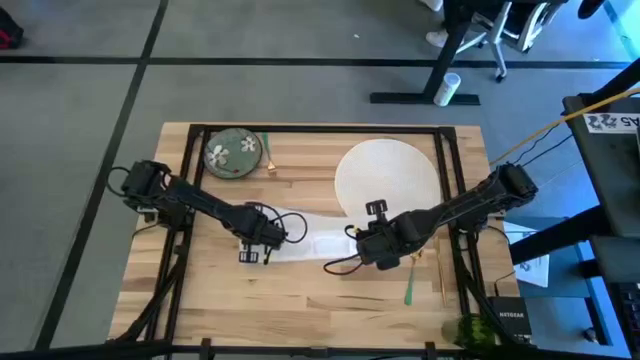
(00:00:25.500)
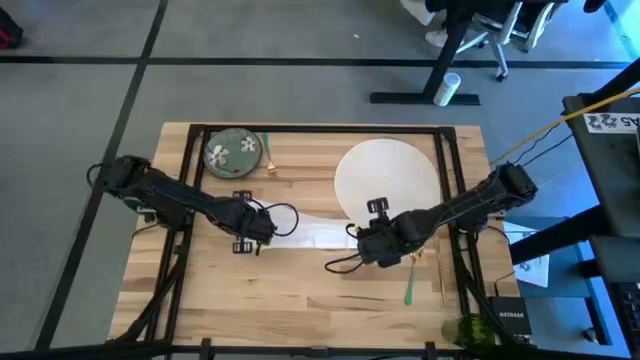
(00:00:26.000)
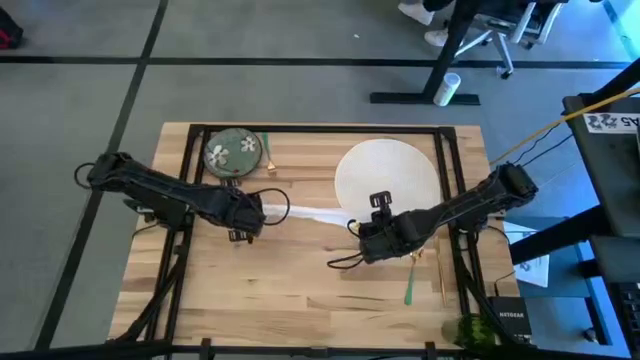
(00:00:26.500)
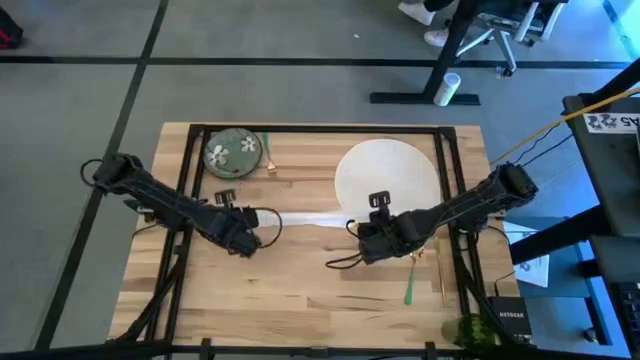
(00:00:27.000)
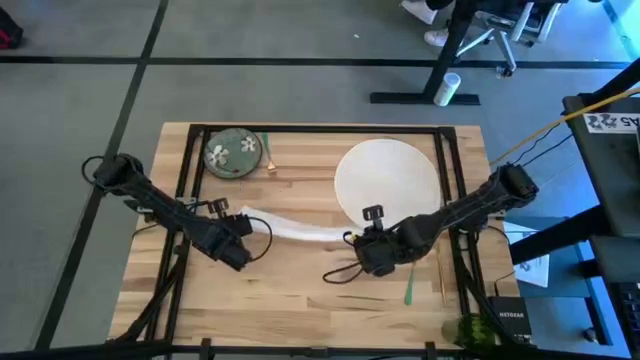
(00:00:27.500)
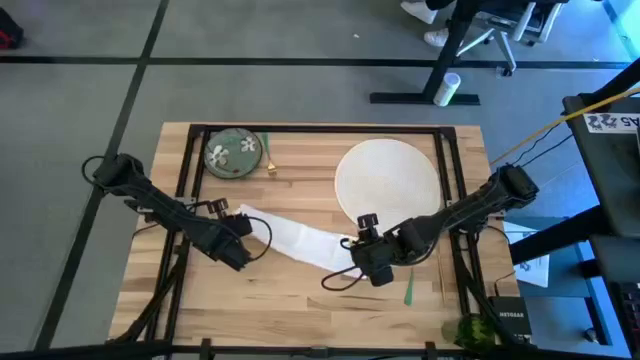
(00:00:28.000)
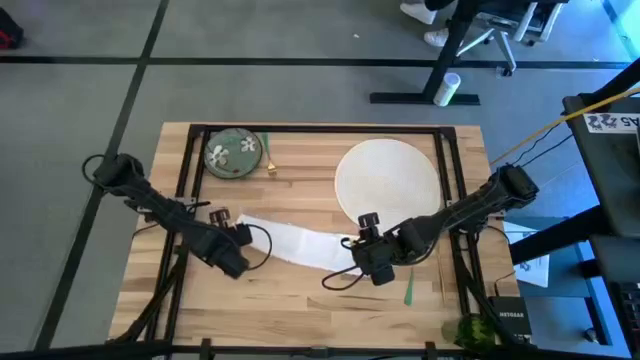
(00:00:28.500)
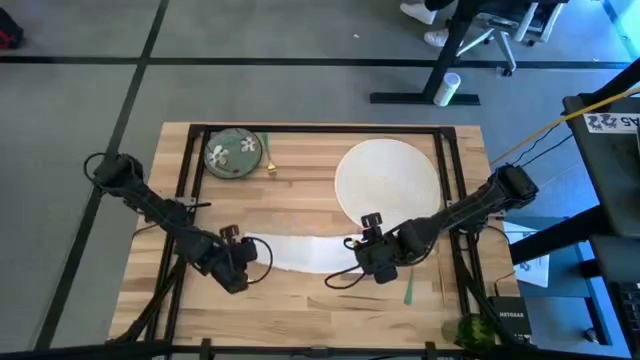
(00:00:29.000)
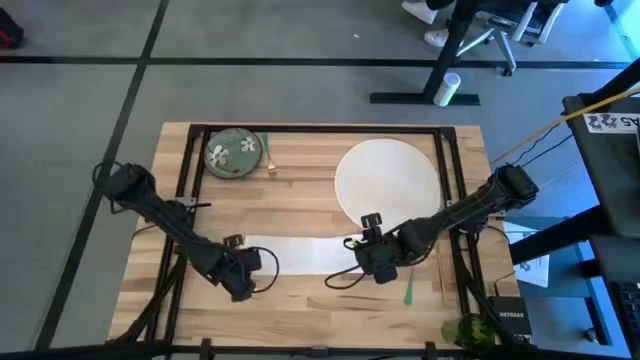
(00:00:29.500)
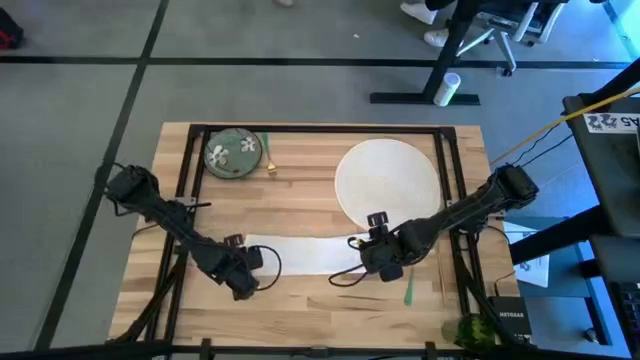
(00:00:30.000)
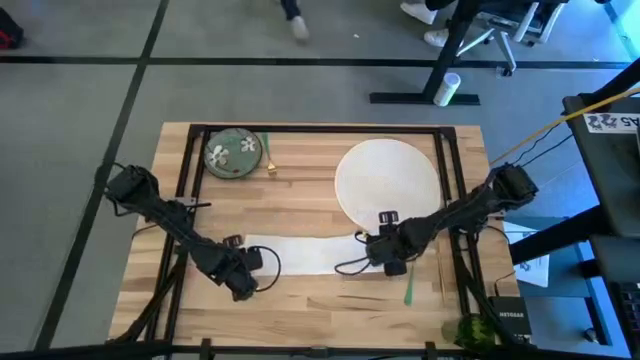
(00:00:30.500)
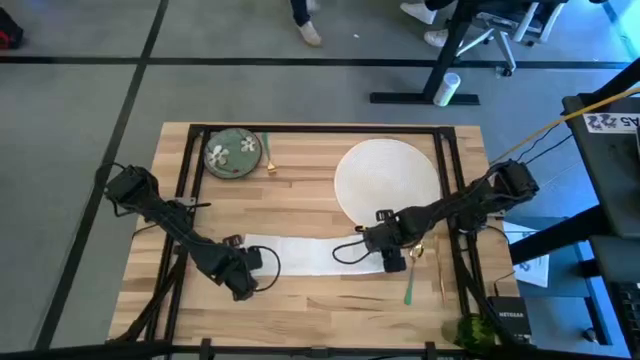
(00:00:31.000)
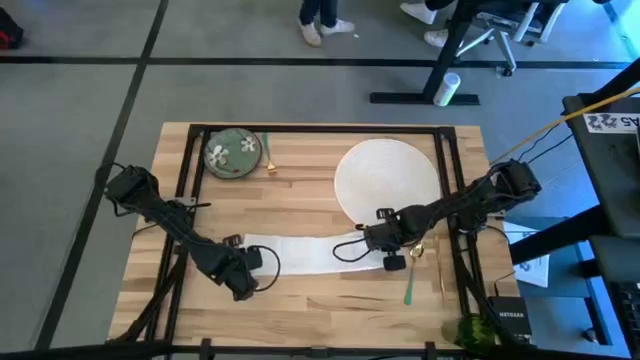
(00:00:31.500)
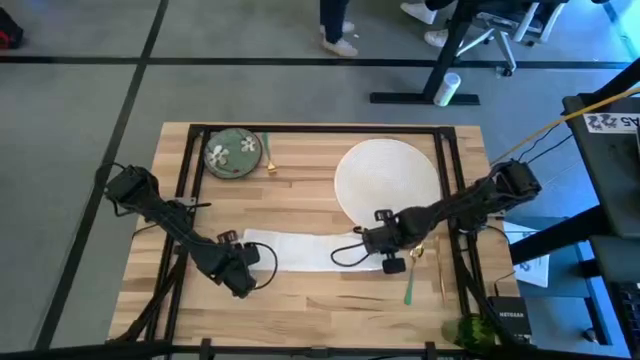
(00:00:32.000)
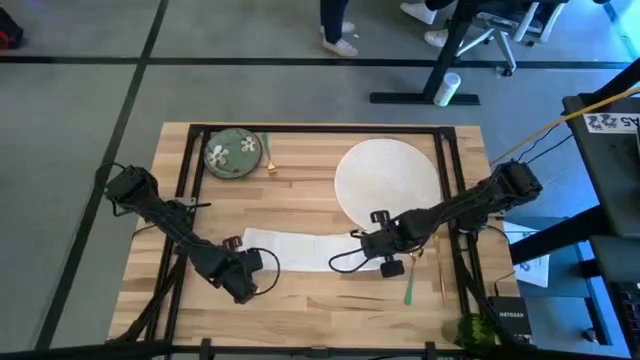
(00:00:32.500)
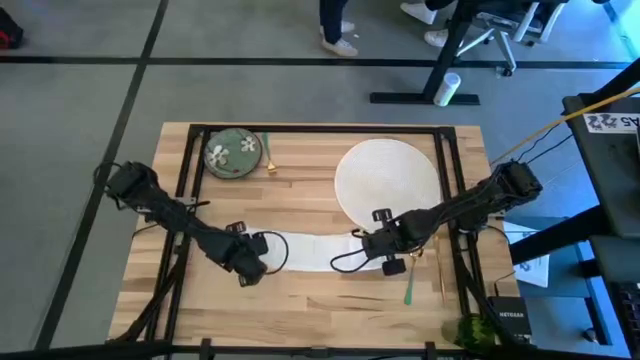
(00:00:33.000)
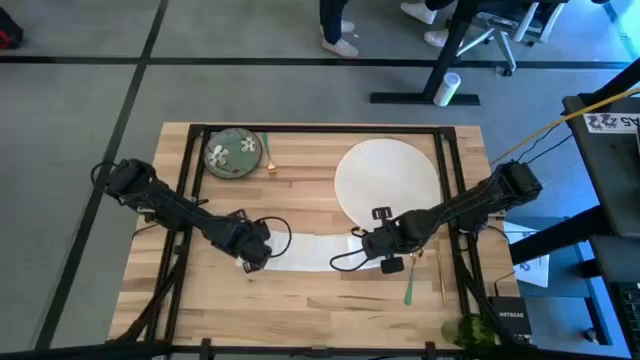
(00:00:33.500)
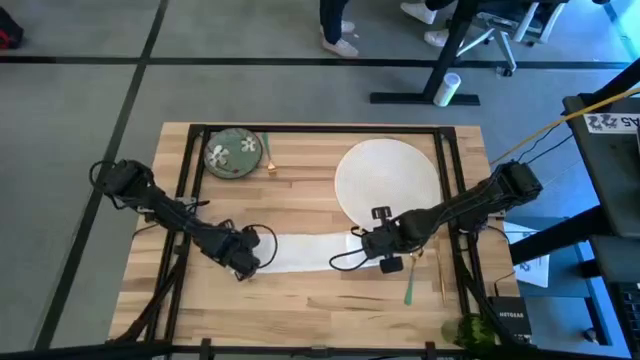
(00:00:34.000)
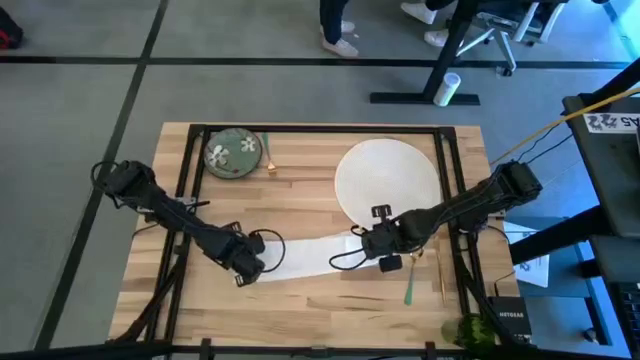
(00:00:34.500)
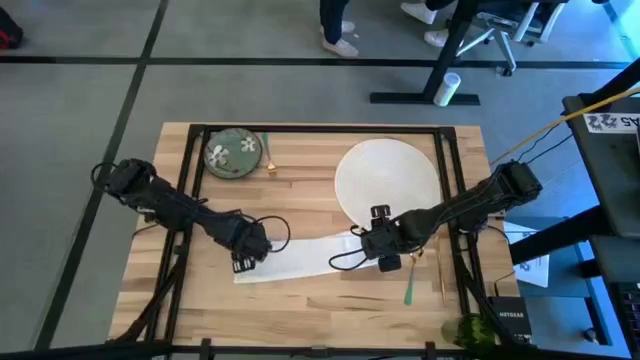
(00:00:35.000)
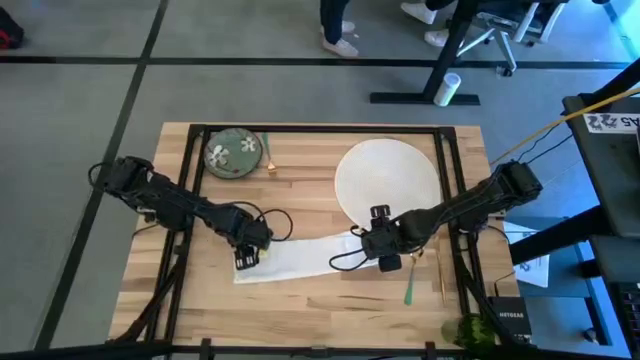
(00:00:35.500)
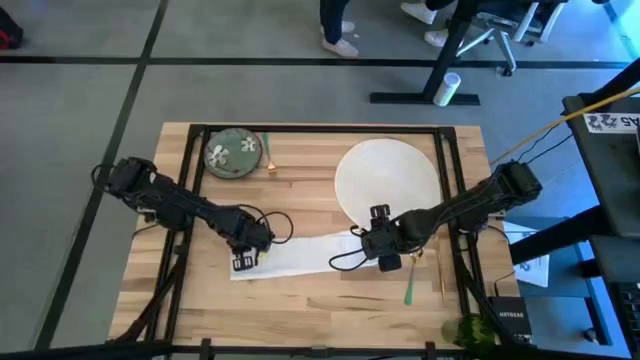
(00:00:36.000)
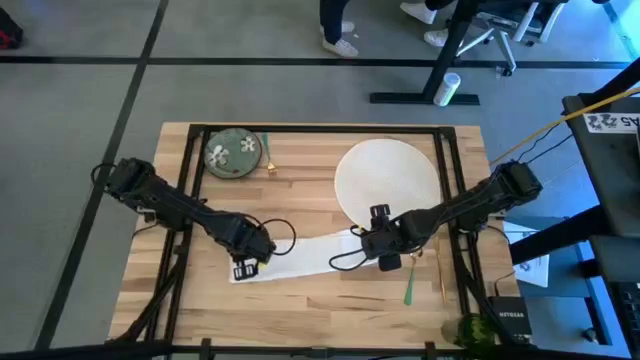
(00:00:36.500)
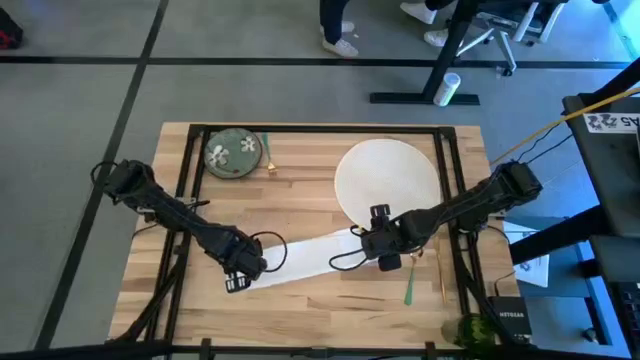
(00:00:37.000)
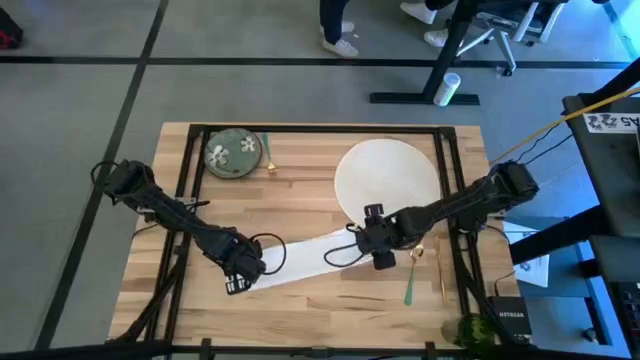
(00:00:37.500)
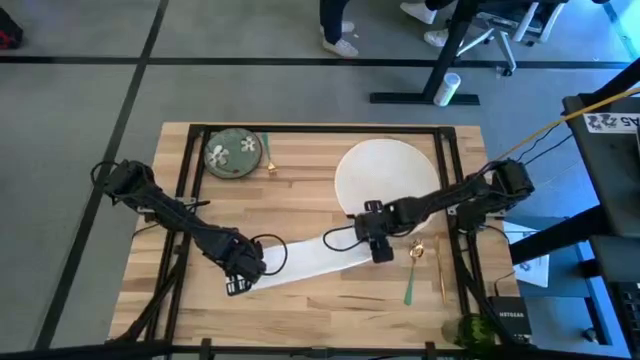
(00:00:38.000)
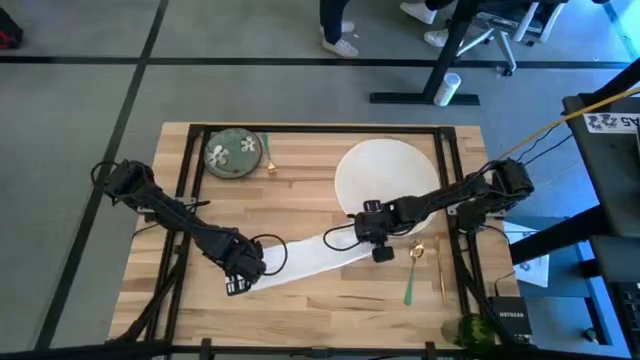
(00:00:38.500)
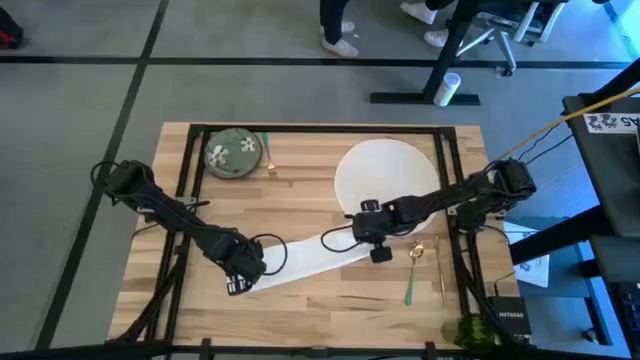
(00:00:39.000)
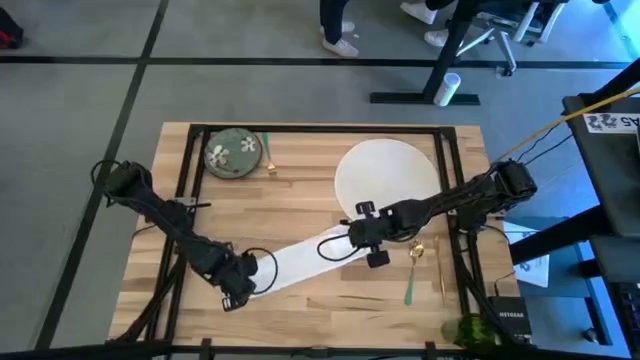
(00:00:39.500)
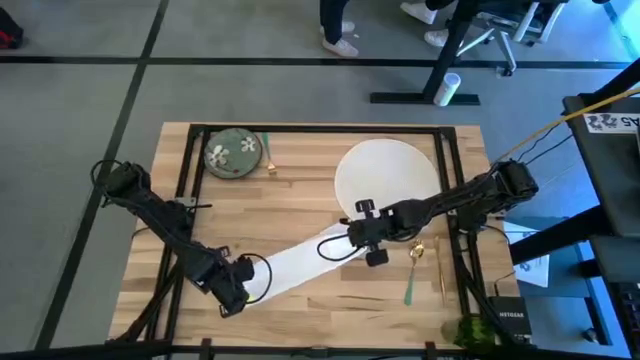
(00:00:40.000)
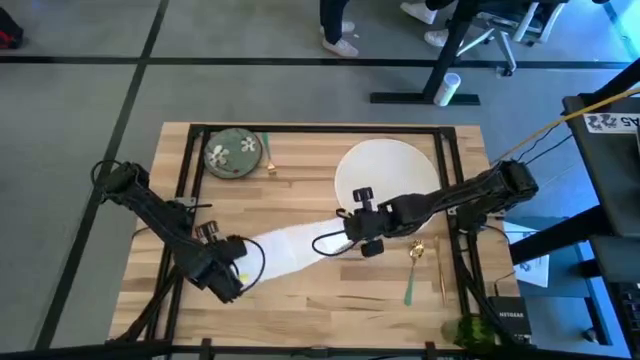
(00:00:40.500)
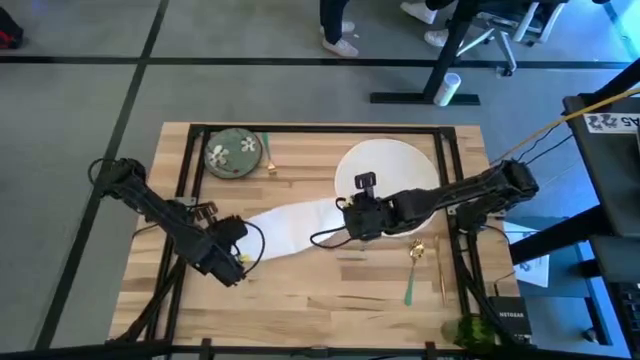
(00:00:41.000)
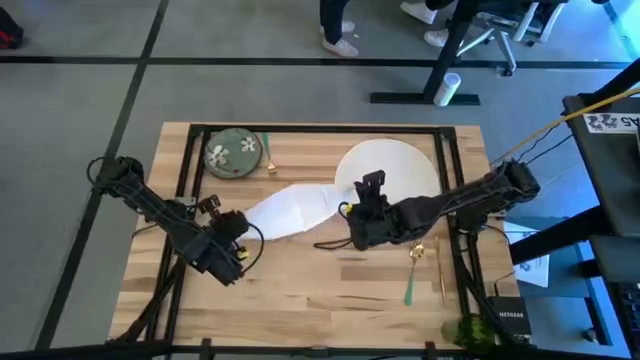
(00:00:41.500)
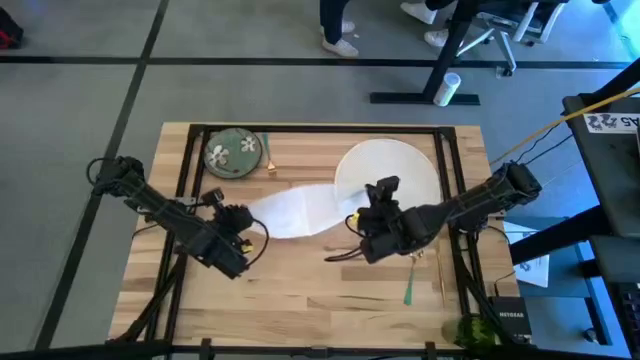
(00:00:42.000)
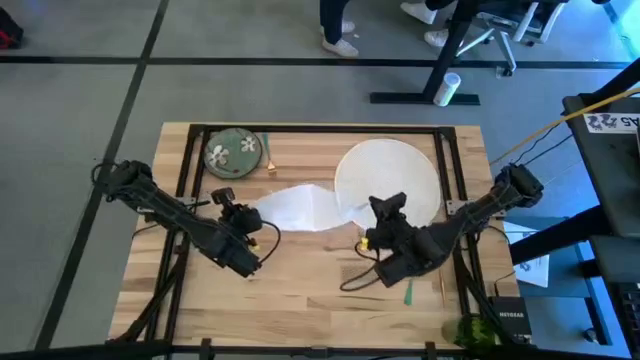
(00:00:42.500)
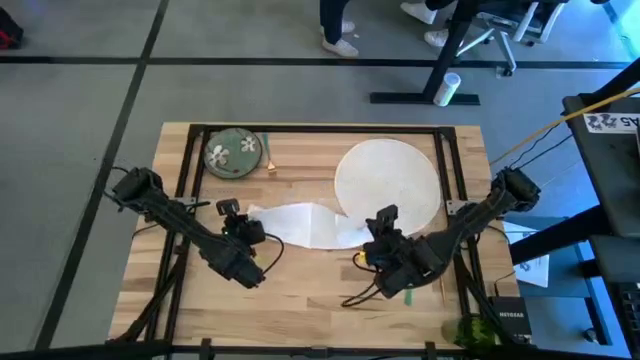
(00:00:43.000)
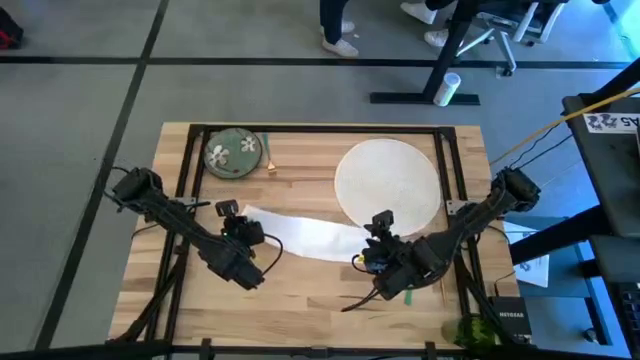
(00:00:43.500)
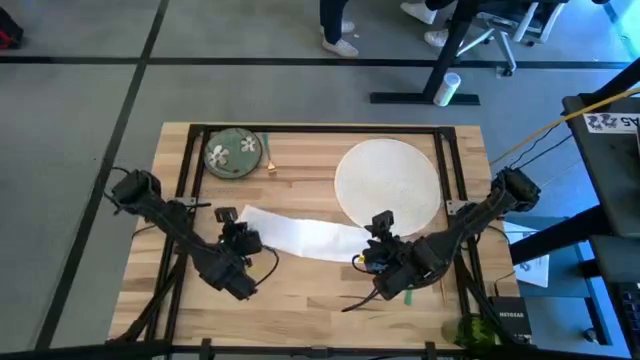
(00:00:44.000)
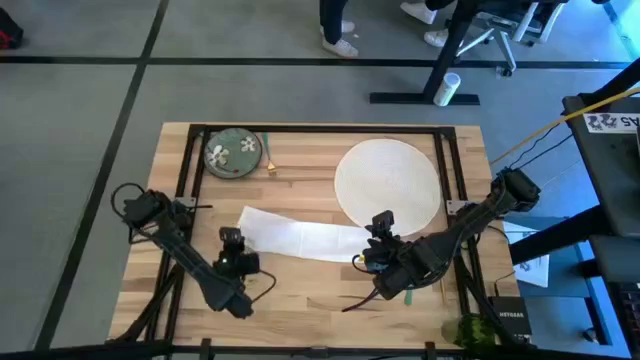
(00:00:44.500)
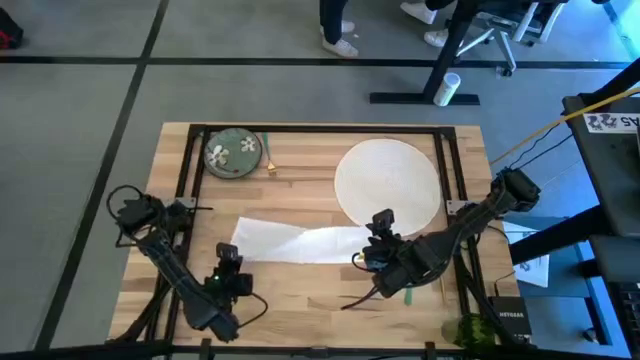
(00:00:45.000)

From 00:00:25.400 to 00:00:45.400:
Task: Set table place
Fold the white table napkin
